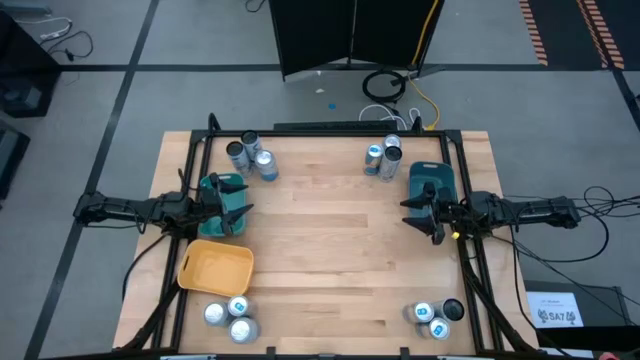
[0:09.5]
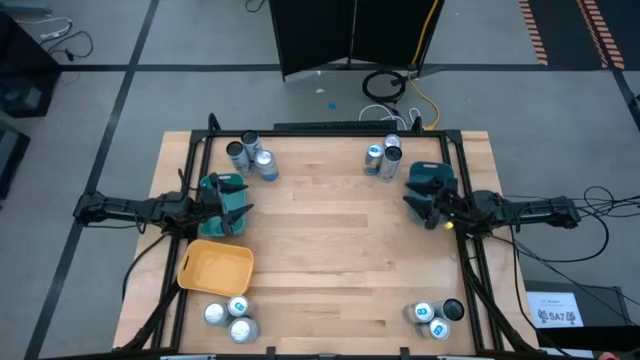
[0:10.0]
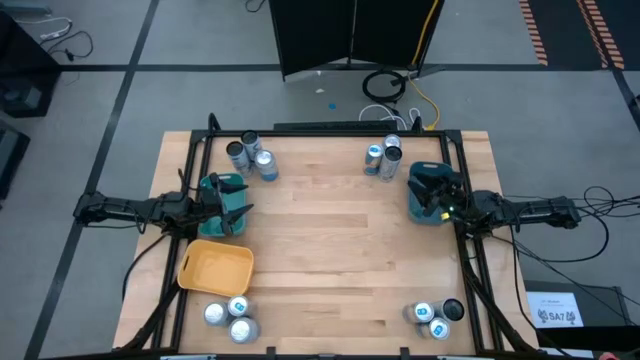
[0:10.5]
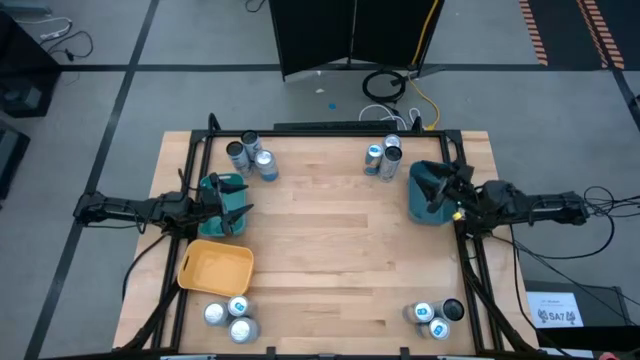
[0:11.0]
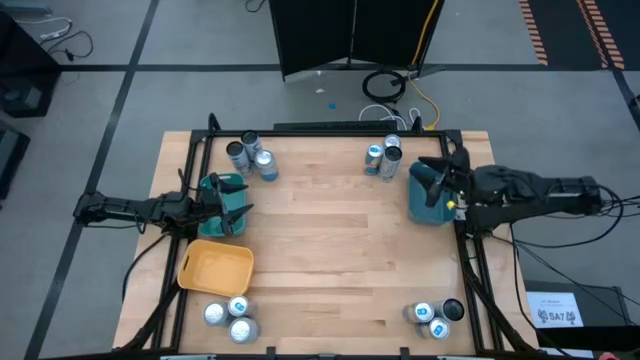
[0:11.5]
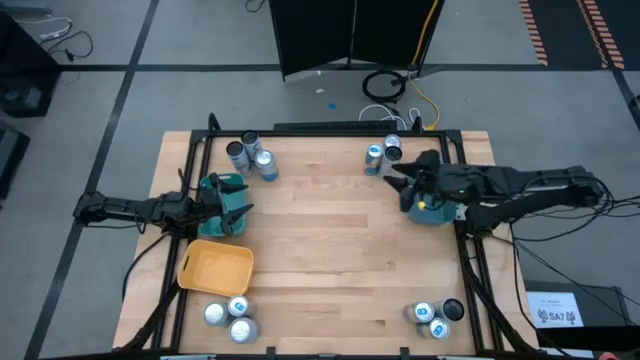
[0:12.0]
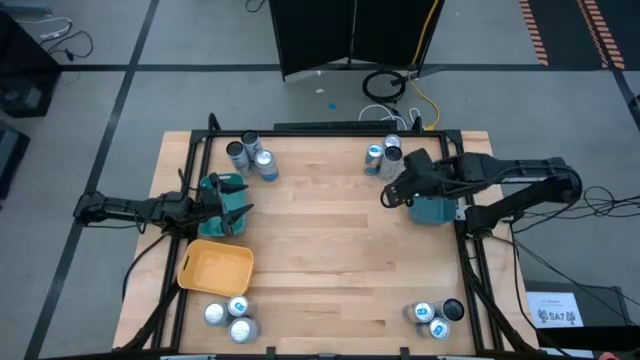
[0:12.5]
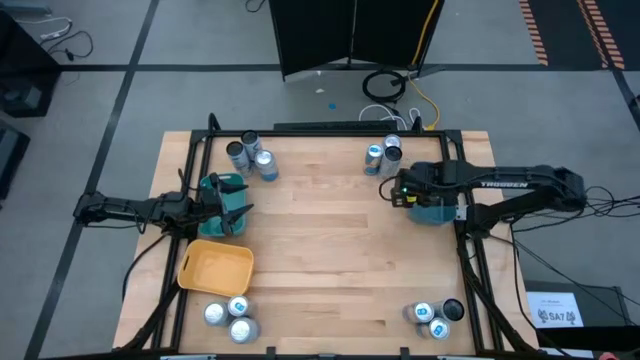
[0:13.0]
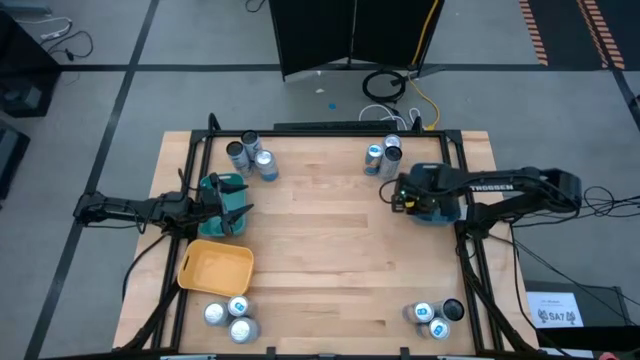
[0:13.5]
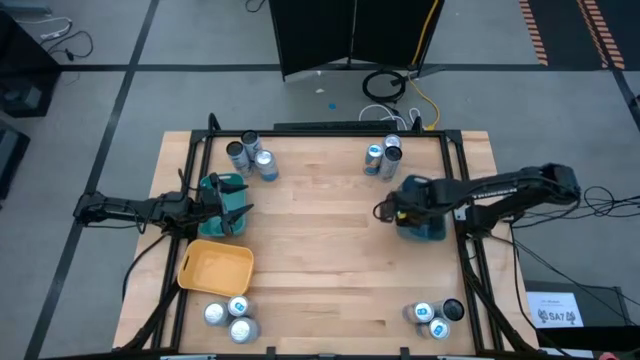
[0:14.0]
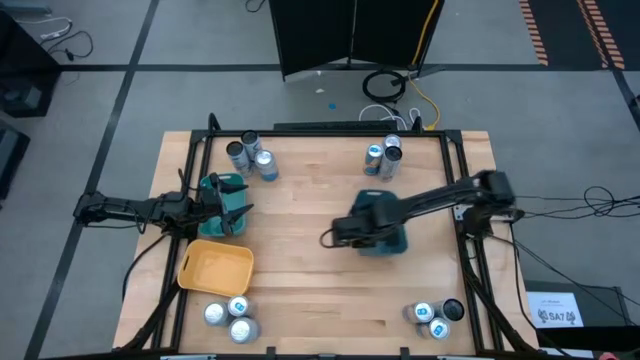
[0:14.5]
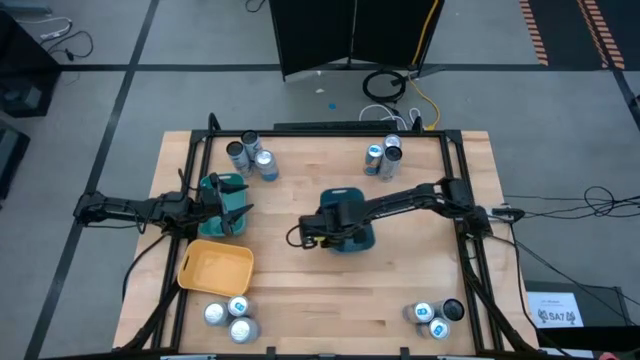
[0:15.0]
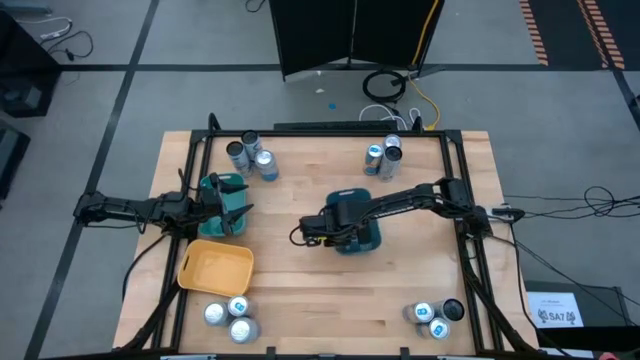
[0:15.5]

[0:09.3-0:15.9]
Task: Sort soda cans
Move the blue bin to the center of the table

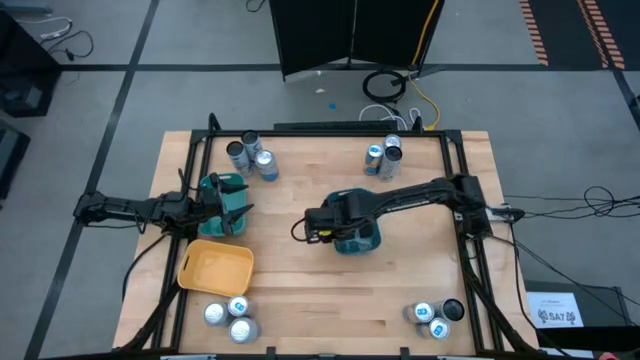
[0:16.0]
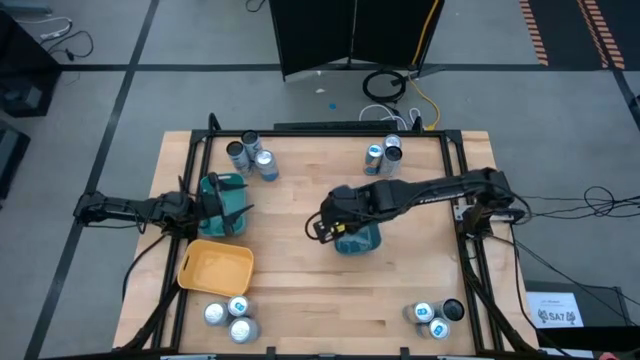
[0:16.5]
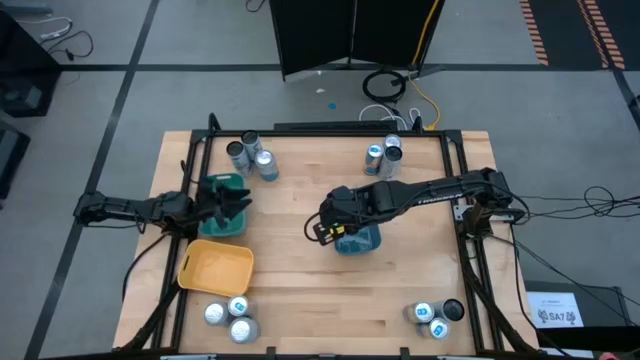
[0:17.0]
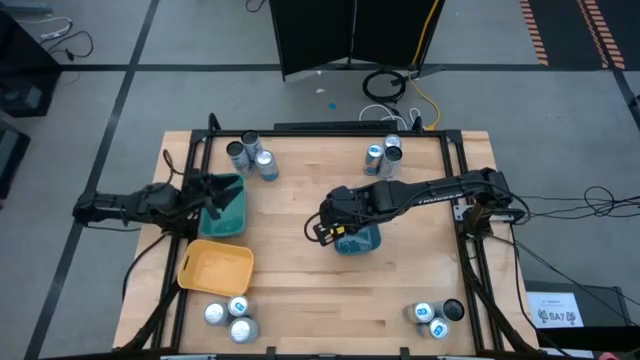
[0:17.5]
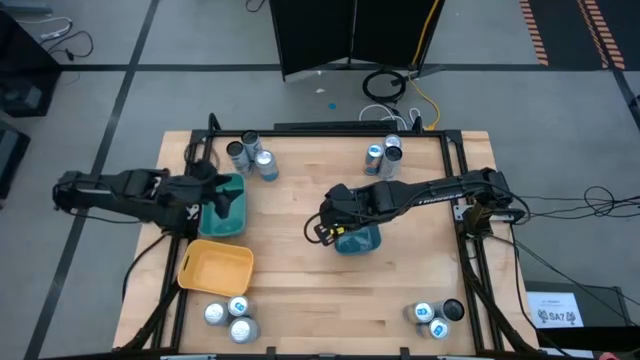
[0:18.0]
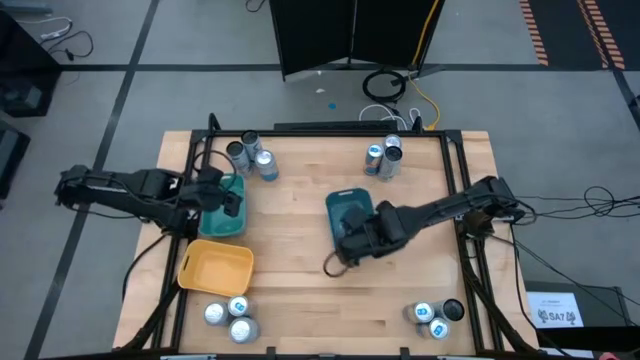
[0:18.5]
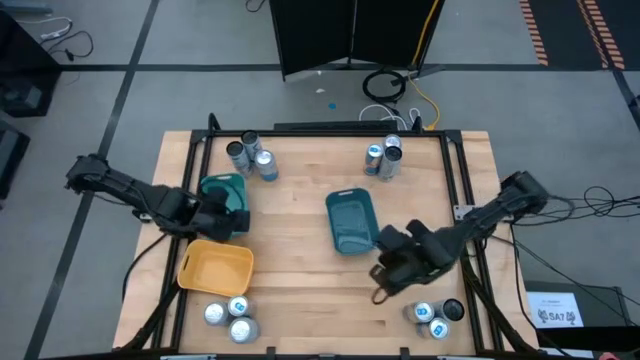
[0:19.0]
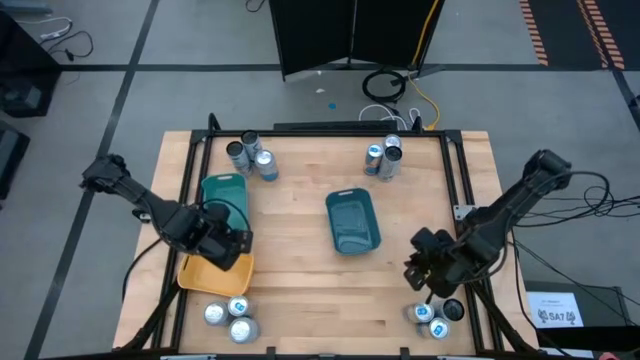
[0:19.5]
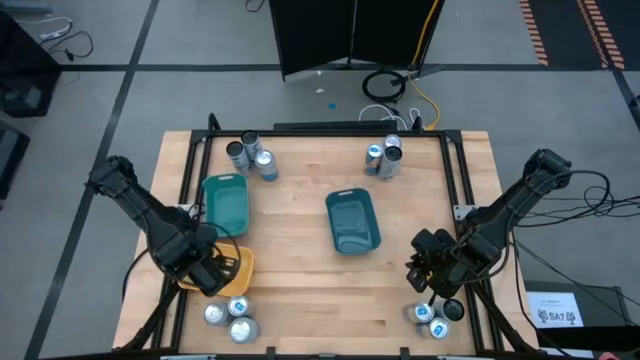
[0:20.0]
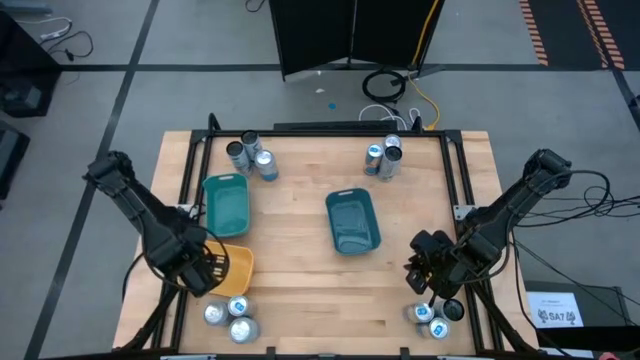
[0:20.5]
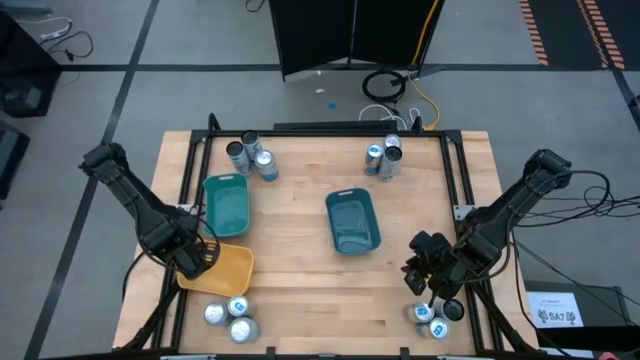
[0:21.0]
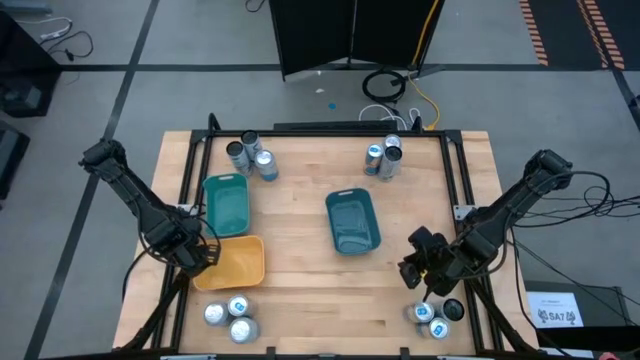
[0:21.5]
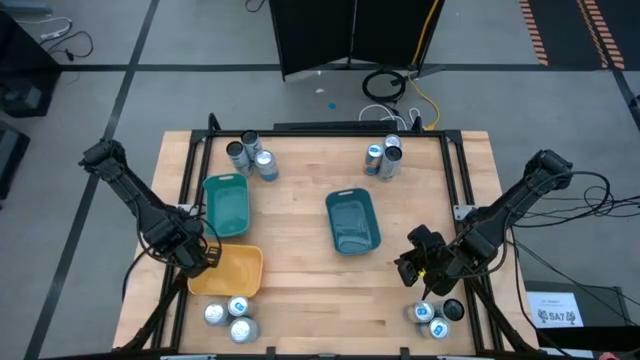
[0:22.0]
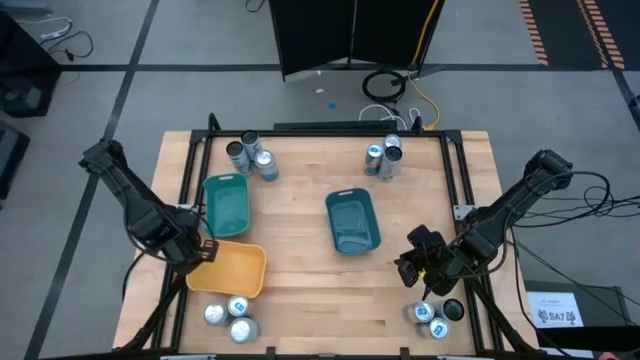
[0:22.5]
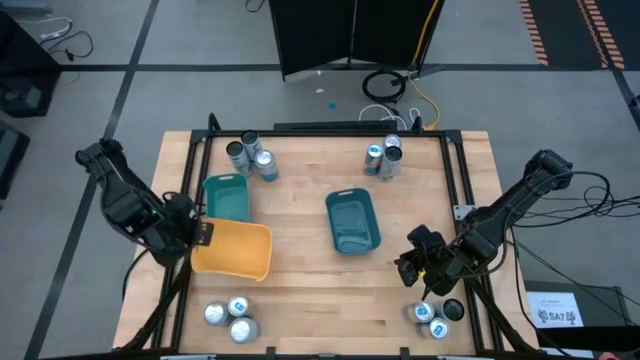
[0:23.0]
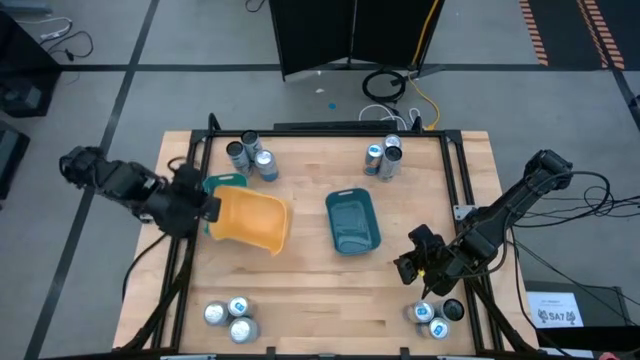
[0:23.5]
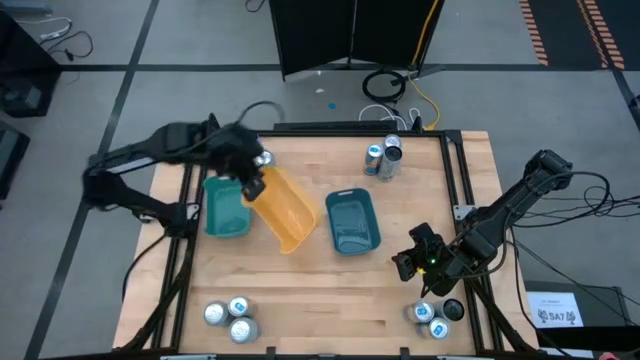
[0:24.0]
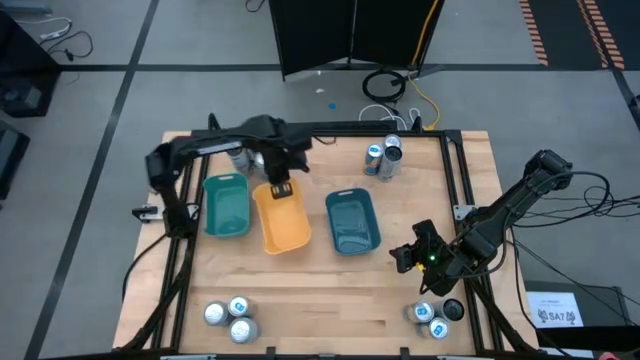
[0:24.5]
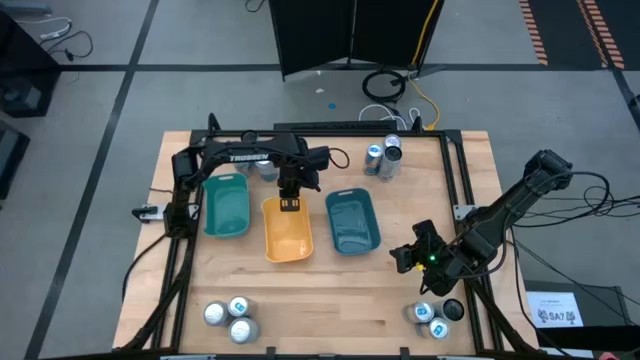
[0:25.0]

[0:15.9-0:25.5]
Move the yellow bin to the left side of the blue bin

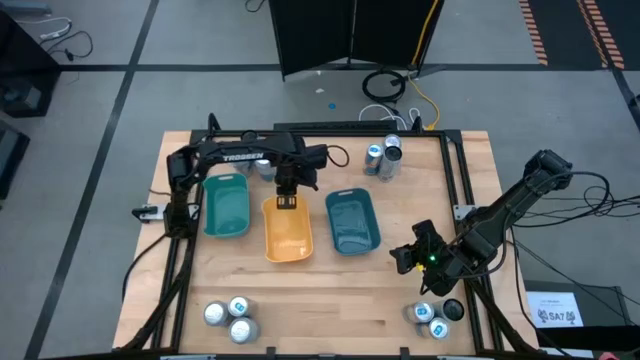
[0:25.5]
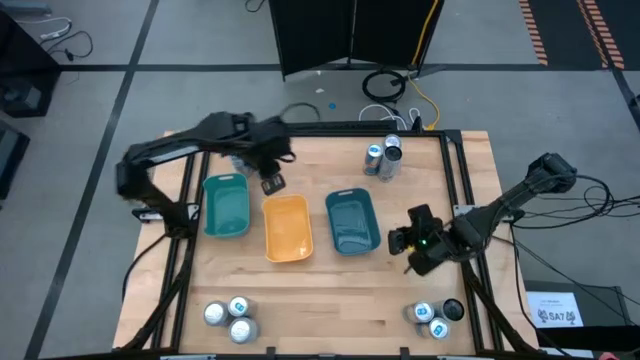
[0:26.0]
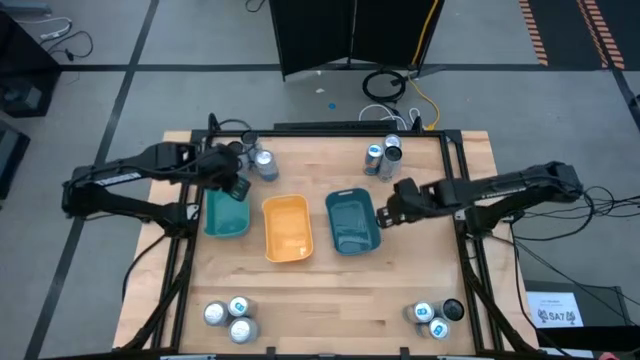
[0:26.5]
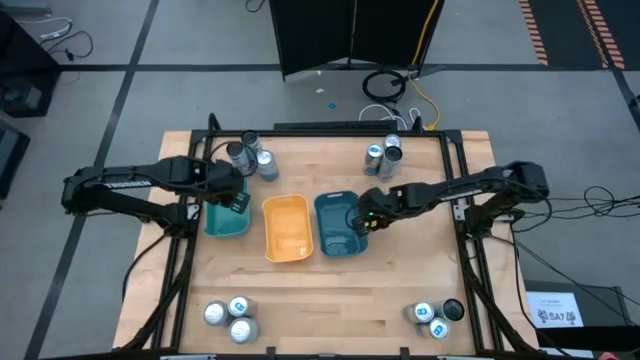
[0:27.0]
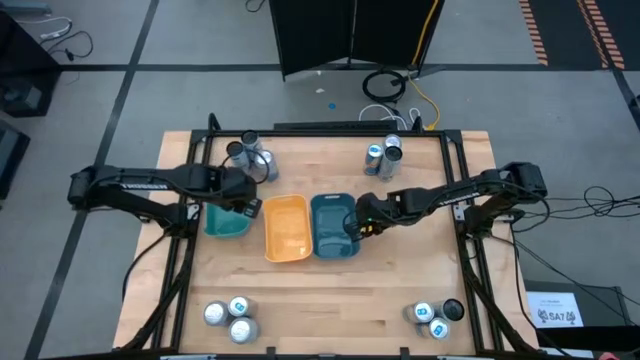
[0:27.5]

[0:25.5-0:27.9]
Adjust the blue bin

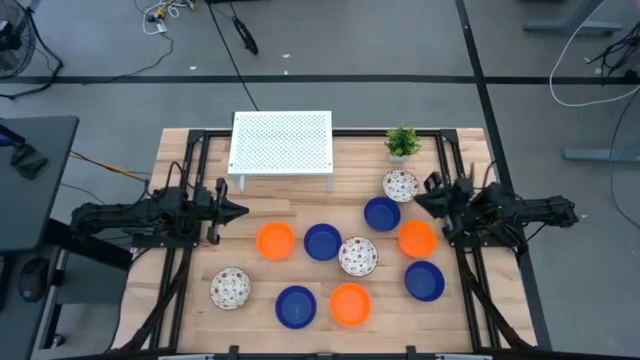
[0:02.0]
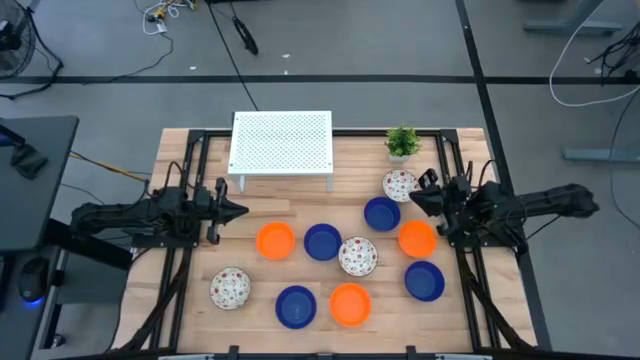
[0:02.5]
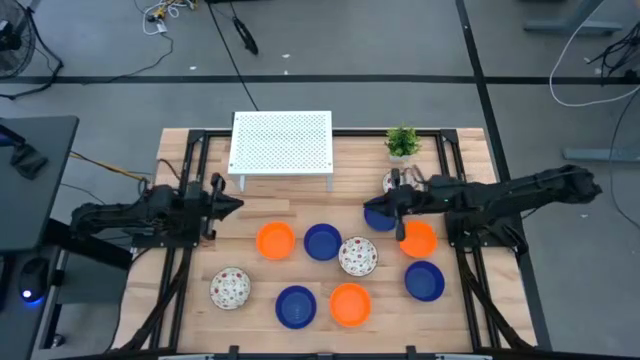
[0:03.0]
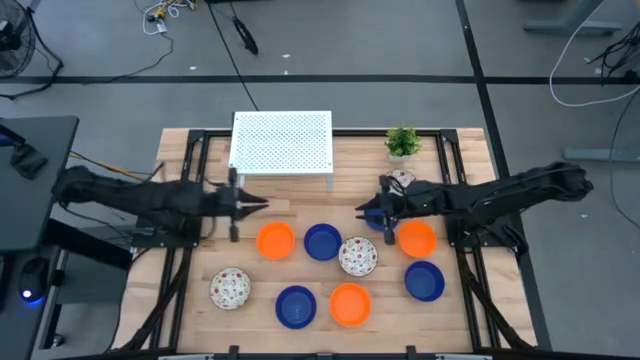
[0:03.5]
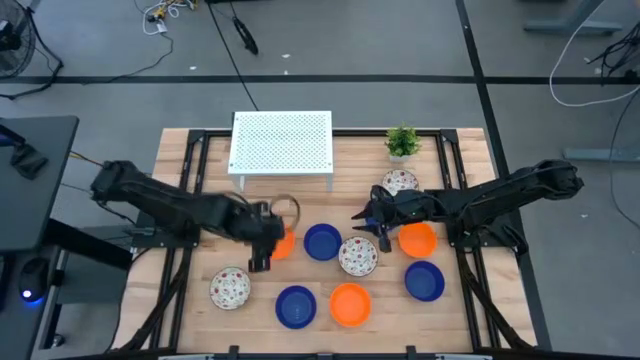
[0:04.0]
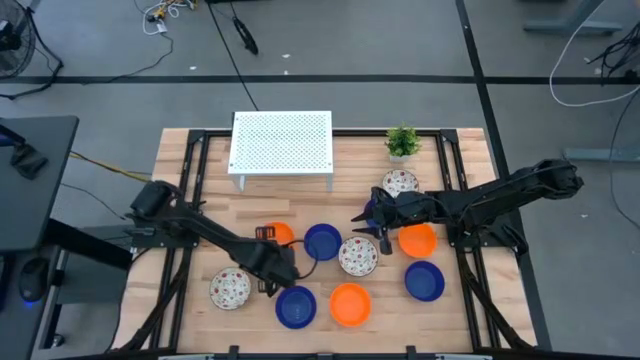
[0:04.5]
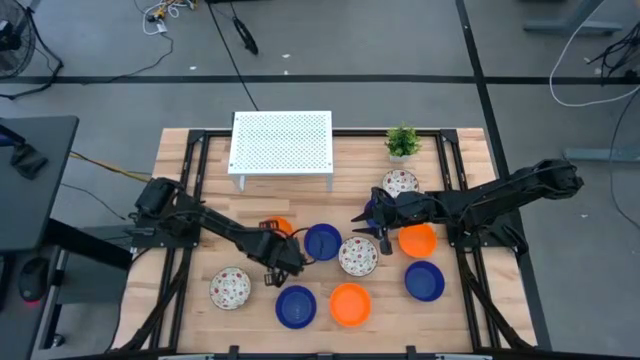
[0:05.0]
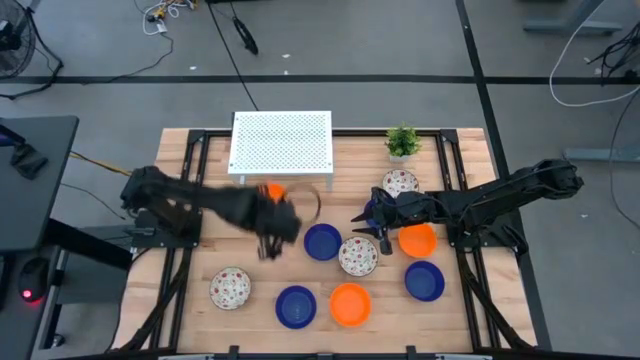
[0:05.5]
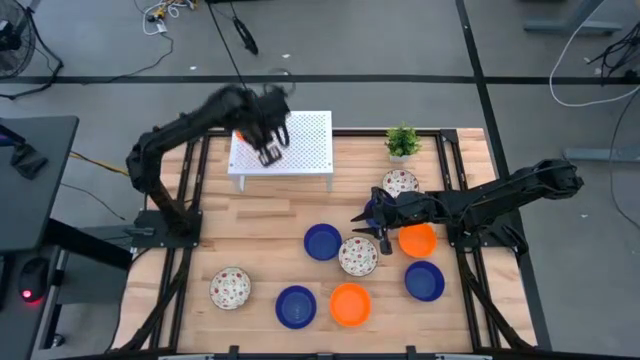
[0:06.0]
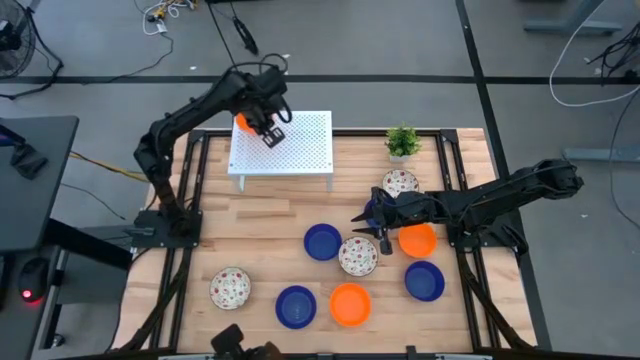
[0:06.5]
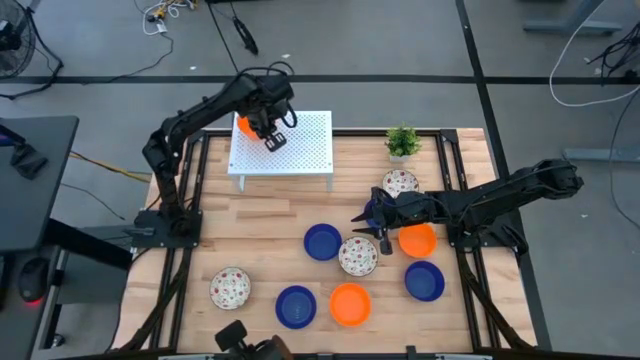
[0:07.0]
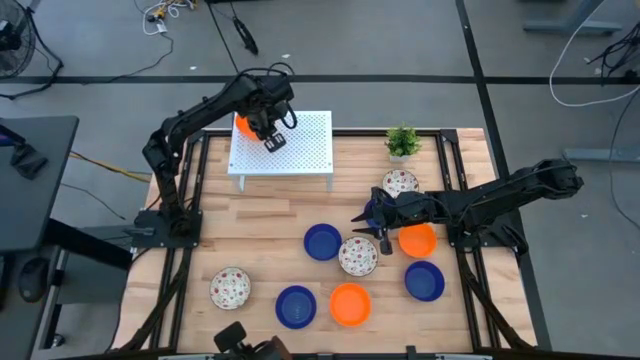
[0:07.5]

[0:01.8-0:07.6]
Task: Pick & Place Mini bowls
Put the orange bowl on the shelf
